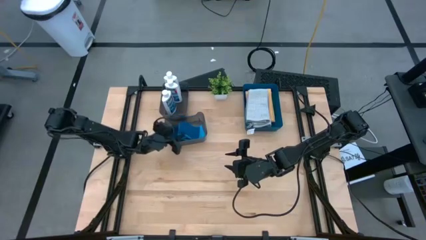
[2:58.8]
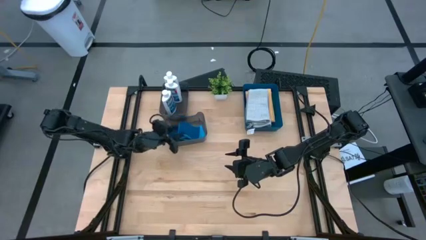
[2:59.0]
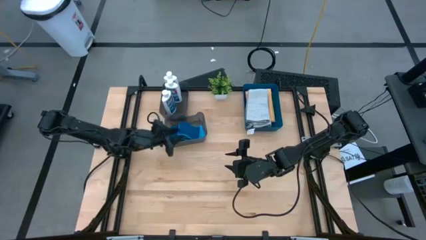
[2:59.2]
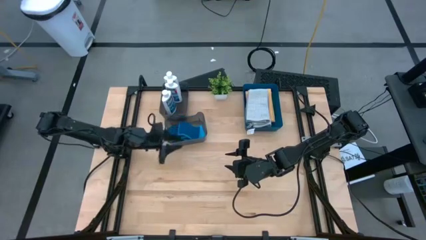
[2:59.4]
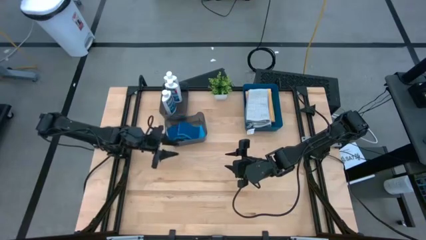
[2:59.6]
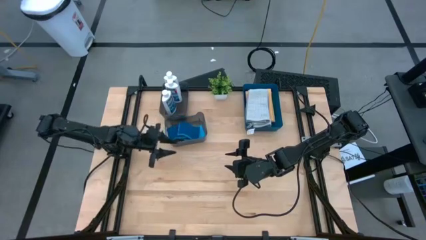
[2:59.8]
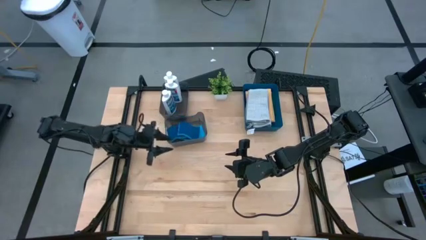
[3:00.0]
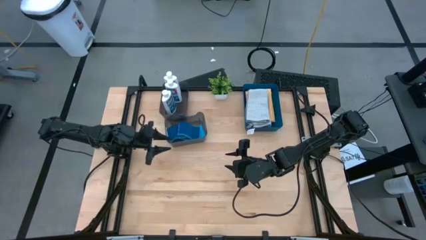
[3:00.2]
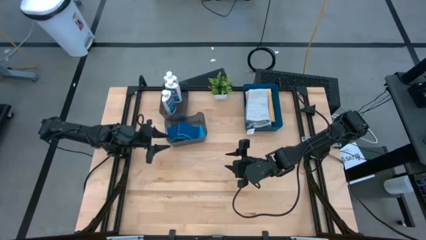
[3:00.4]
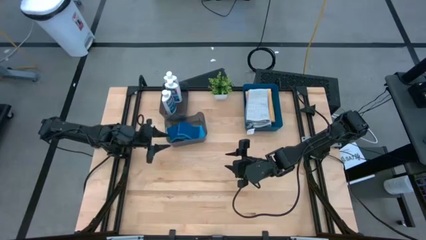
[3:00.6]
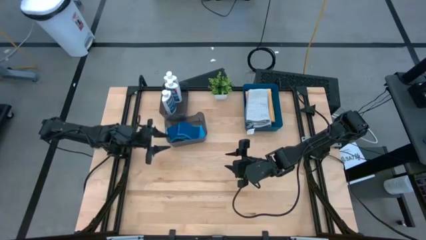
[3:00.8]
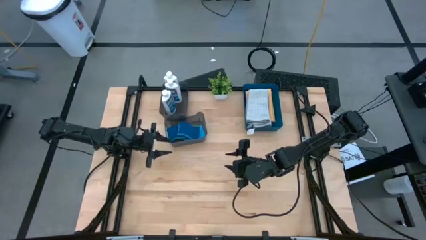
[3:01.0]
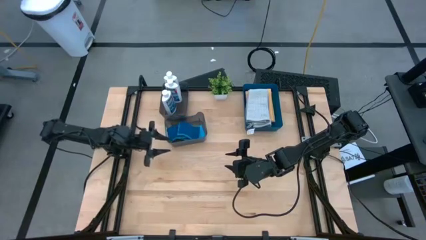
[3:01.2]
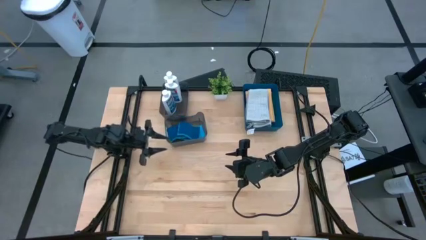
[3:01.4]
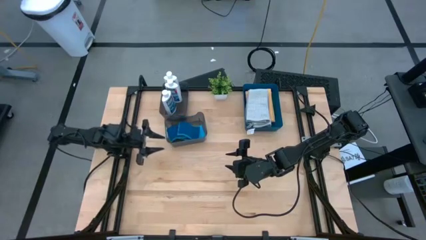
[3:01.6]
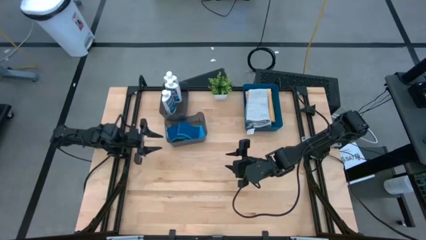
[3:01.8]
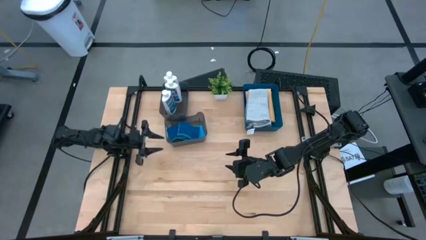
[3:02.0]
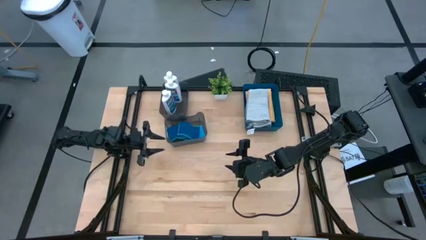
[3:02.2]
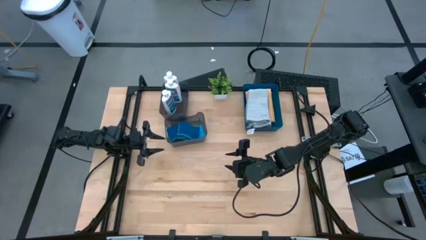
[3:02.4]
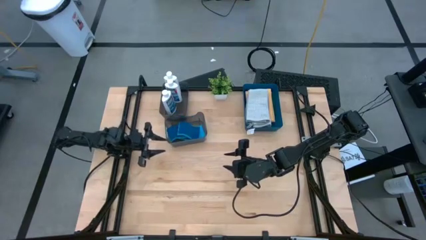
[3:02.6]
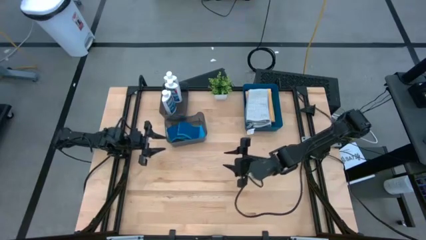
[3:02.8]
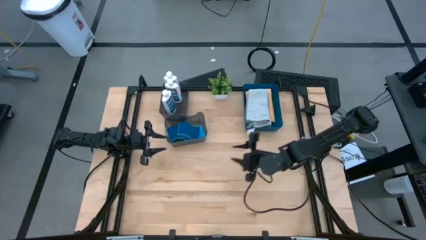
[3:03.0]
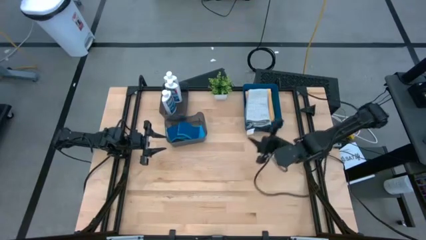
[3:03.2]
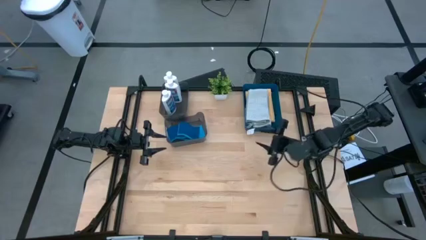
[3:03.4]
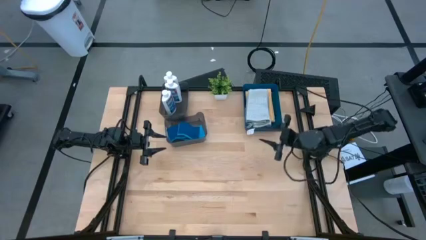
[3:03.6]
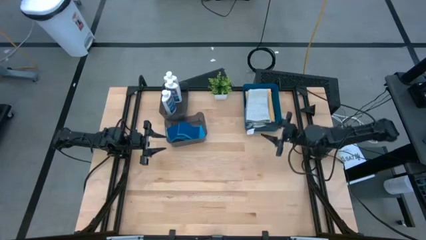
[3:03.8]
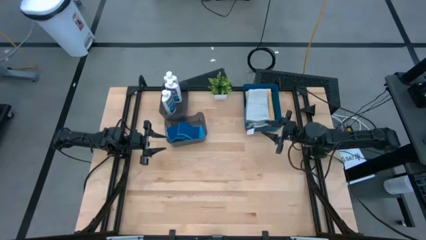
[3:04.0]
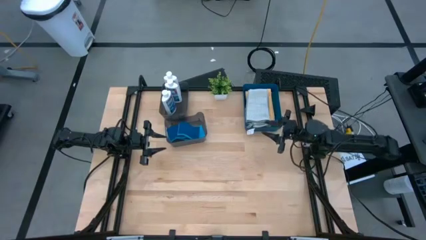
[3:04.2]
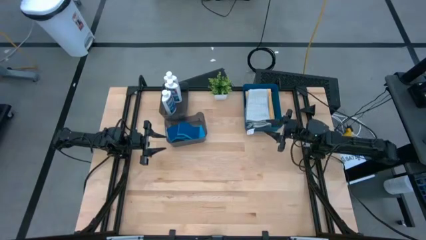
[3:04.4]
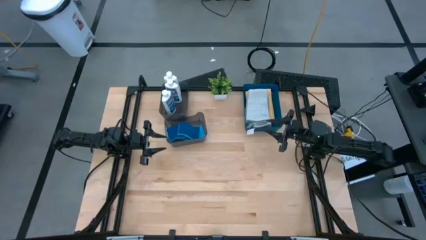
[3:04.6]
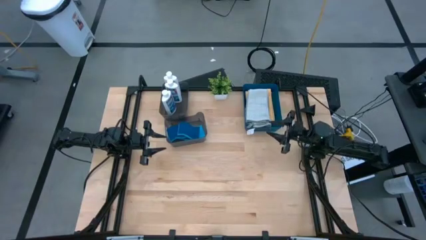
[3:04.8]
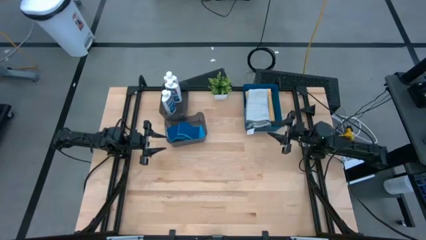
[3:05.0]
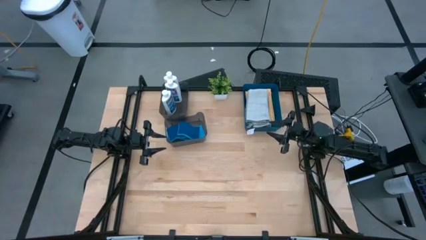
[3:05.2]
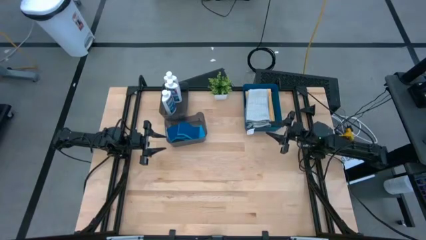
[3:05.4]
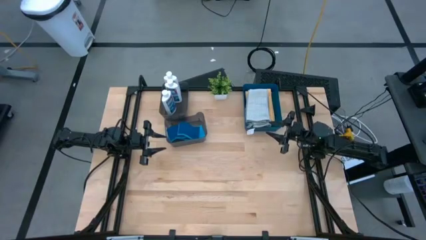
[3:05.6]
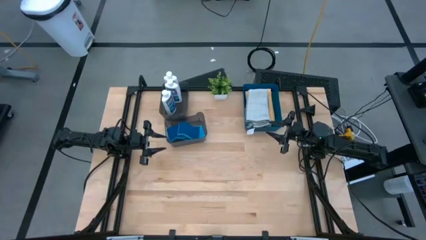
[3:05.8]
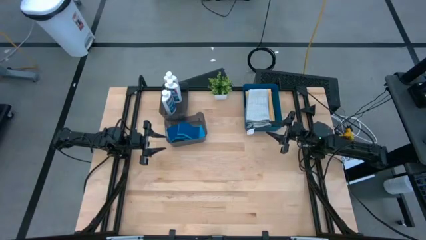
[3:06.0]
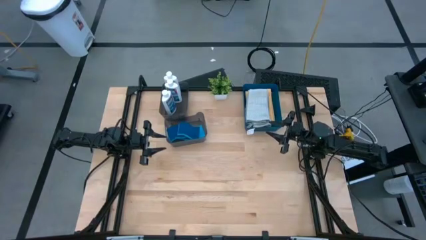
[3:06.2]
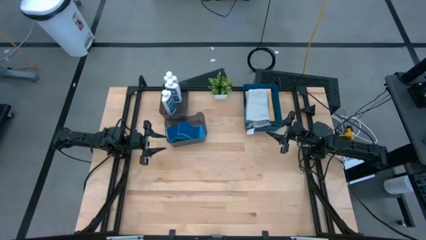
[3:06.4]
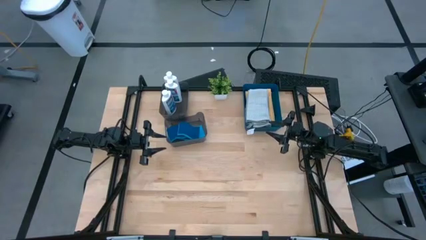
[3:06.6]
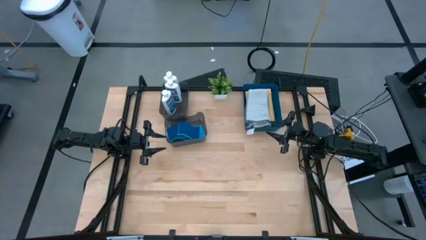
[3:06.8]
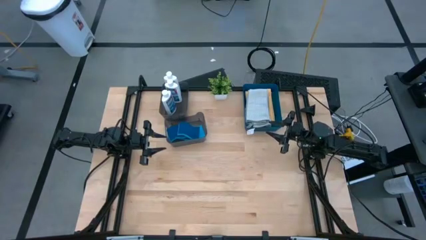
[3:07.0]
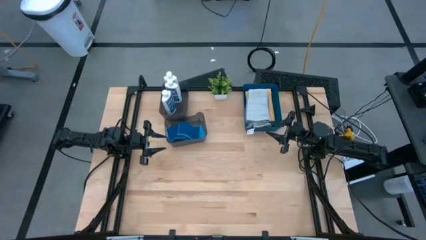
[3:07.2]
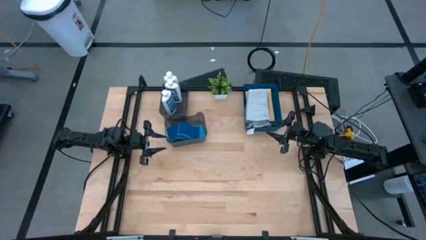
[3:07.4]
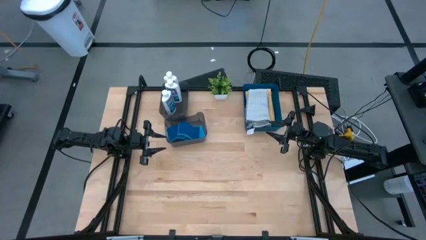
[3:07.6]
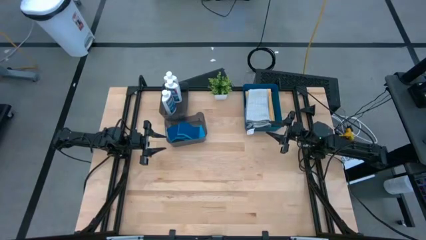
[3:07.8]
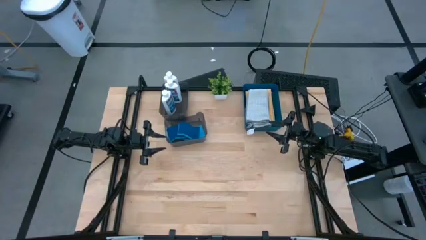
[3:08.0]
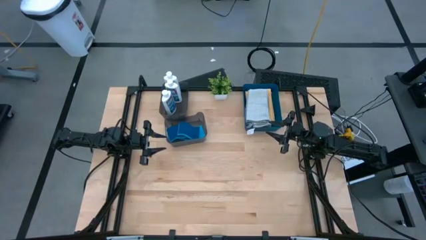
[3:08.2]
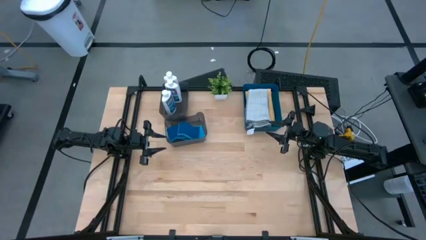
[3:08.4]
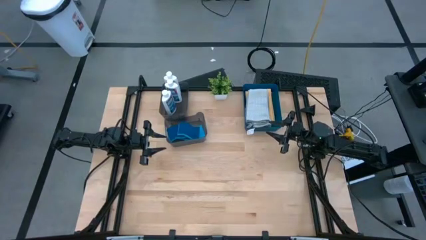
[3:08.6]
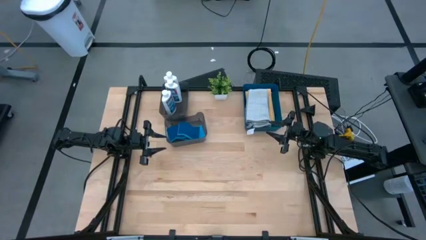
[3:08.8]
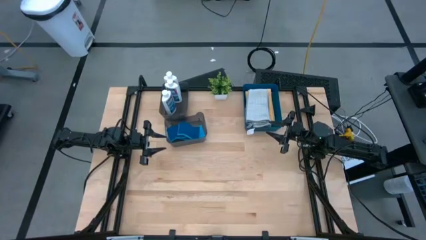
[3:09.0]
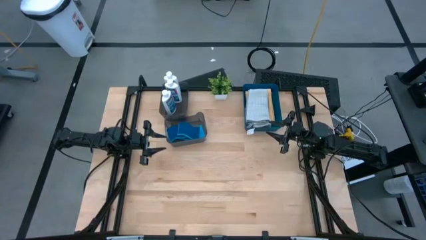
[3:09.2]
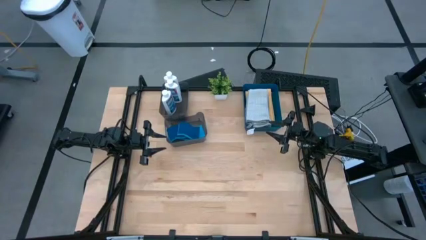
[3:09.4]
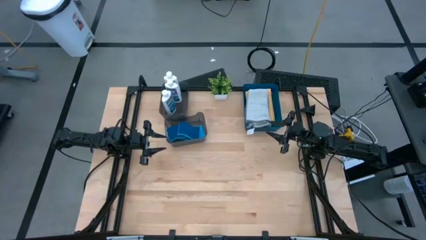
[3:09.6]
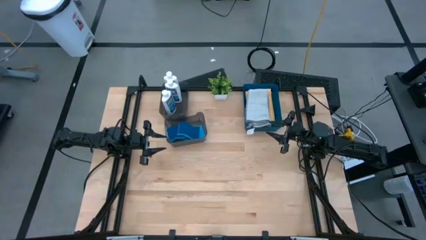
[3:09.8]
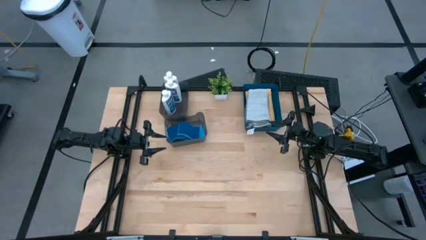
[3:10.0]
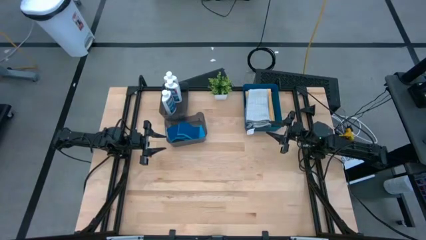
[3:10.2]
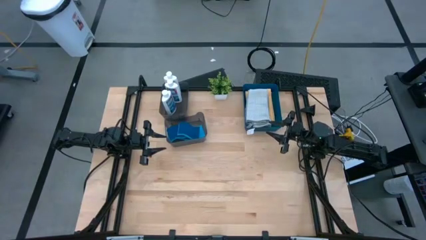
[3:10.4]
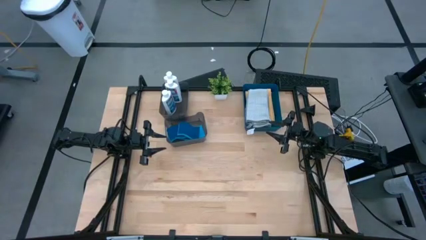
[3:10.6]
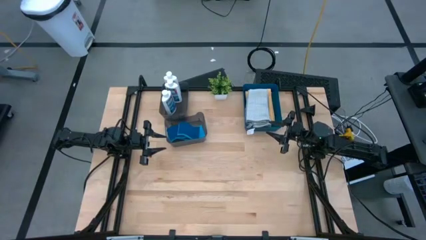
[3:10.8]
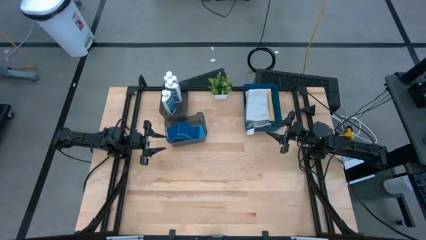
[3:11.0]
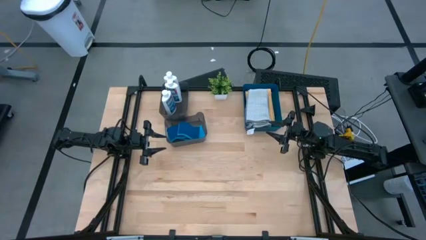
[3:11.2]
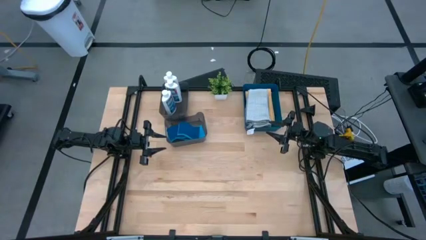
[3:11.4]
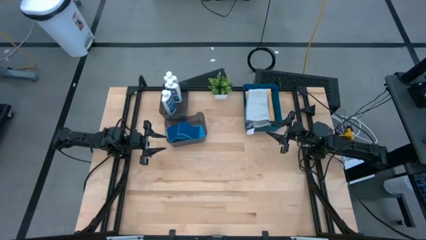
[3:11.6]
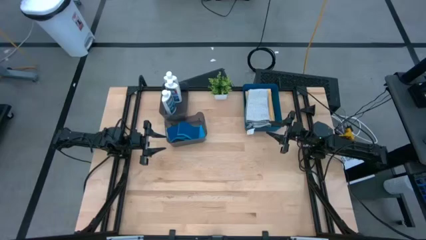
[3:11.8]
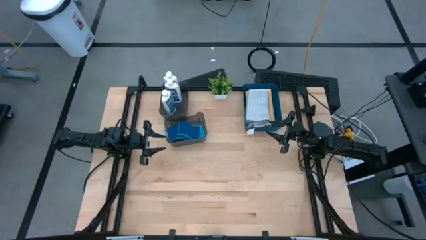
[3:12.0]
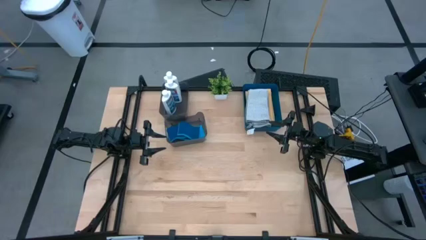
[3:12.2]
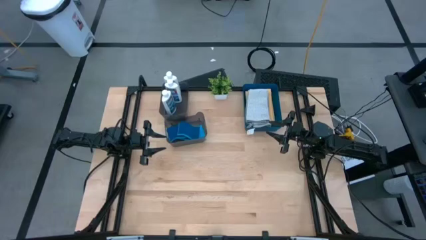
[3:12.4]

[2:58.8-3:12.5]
Task: Pick & Place Kitchen Items
Return to Home Position

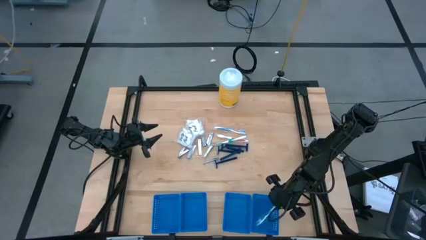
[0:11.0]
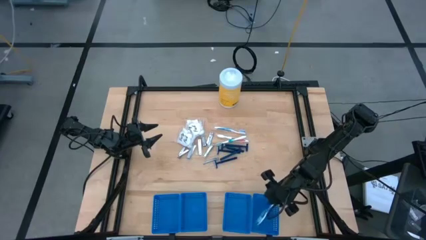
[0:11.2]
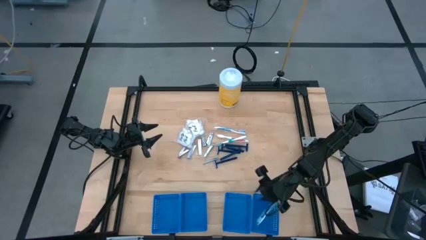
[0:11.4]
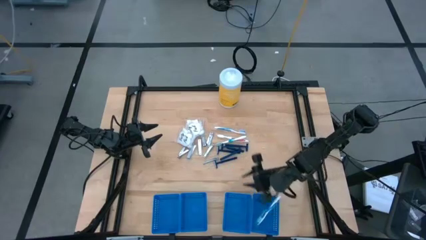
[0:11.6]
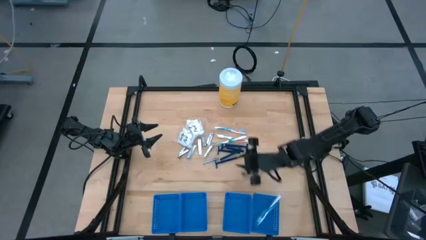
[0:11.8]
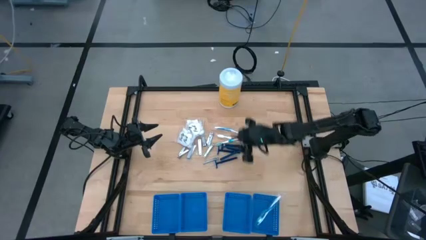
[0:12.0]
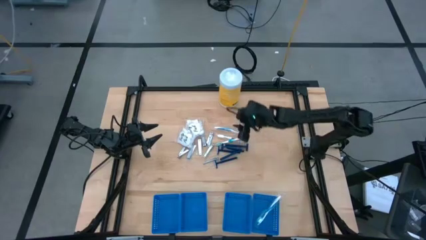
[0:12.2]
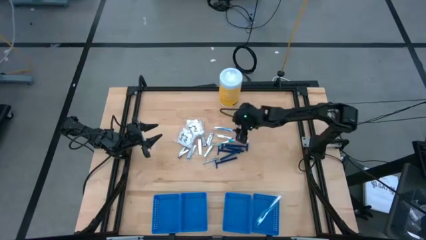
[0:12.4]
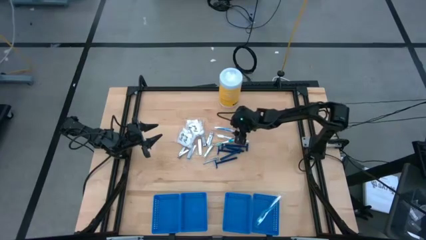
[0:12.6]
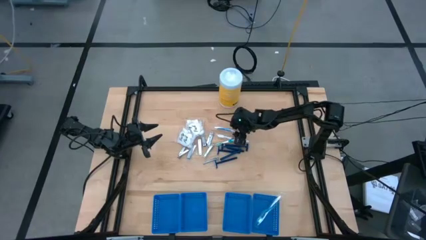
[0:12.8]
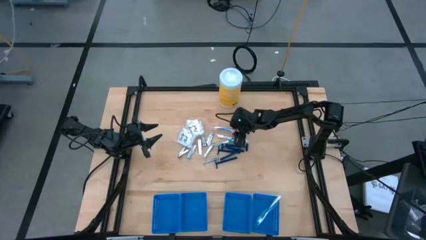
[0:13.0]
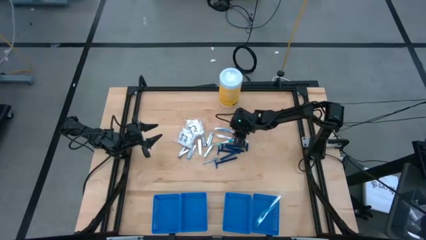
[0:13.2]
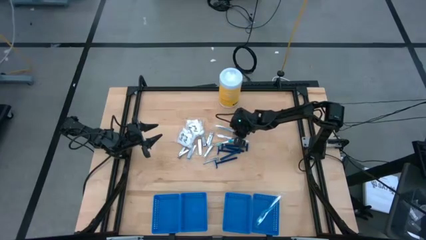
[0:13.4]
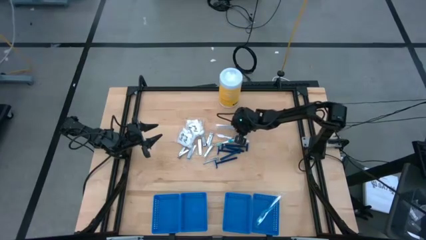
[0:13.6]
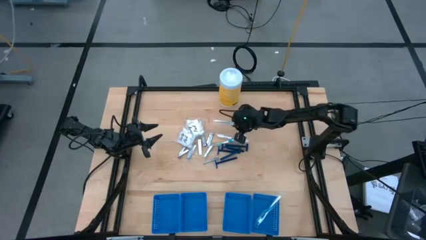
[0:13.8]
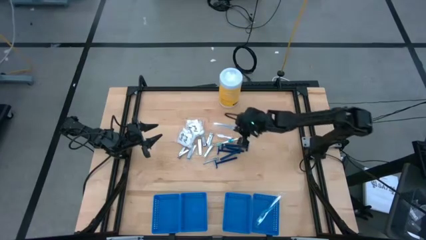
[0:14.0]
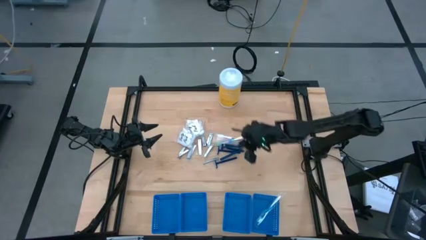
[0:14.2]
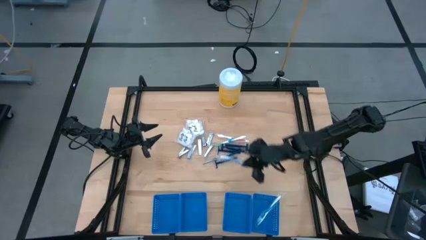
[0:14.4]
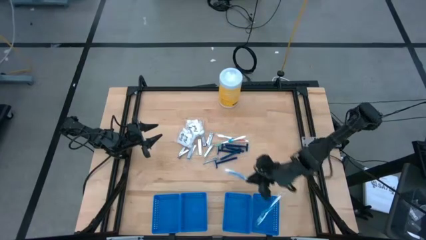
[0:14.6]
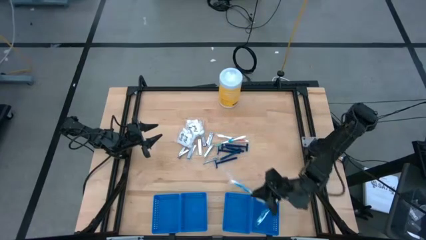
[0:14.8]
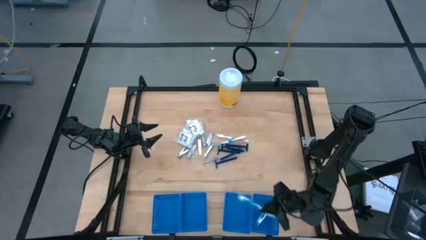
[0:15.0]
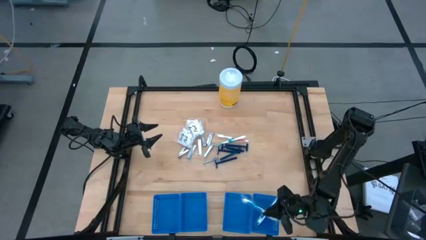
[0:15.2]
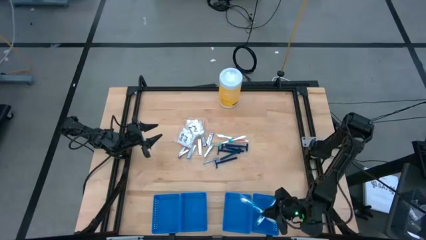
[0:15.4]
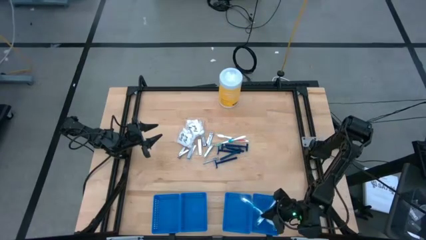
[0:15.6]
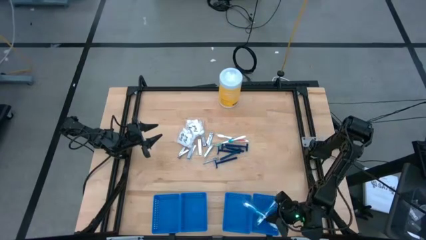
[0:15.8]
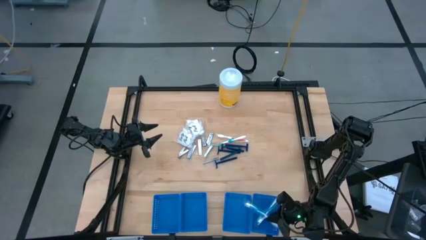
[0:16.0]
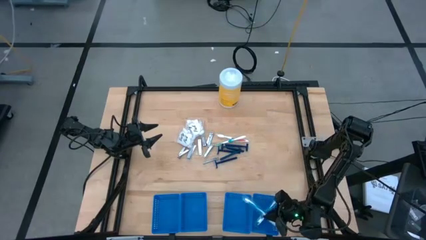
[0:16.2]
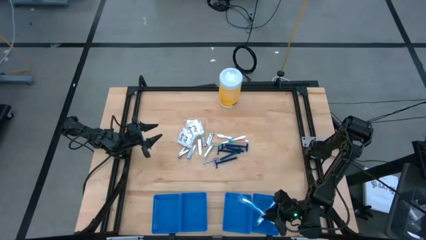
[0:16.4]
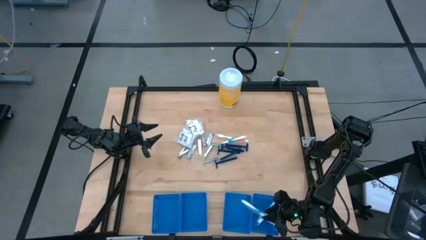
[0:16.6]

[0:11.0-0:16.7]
Task: Pick & Place Travel size toiletries
Put the blue toothbrush into the blue basket
